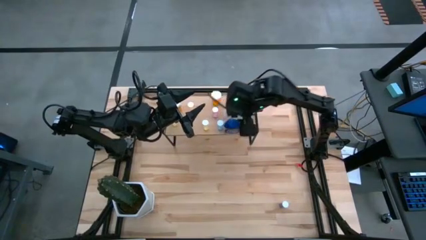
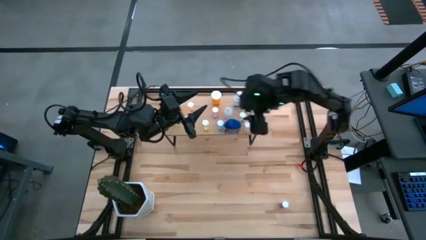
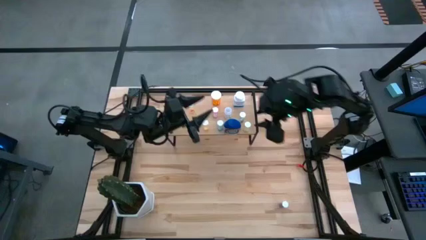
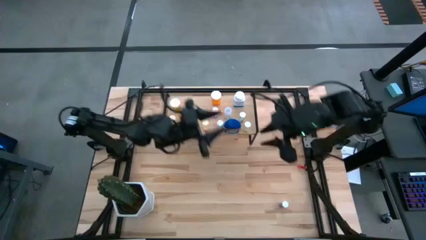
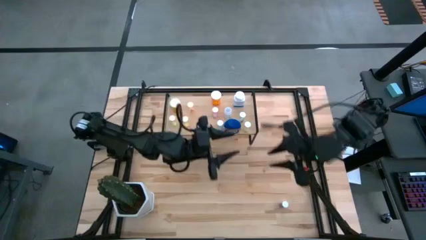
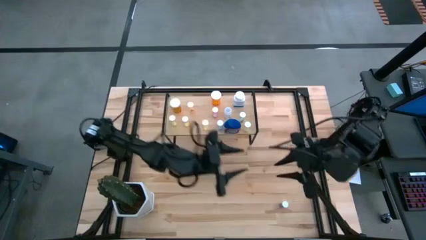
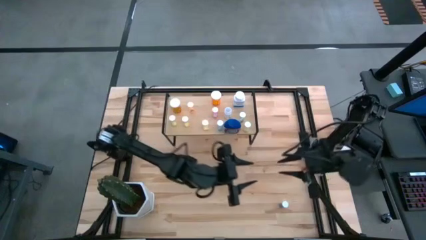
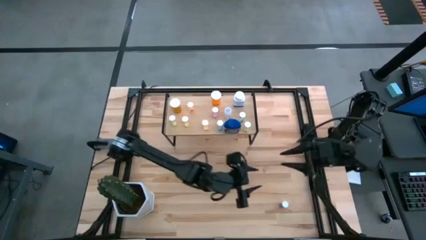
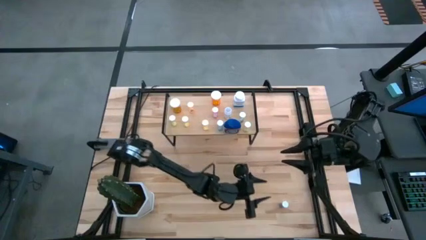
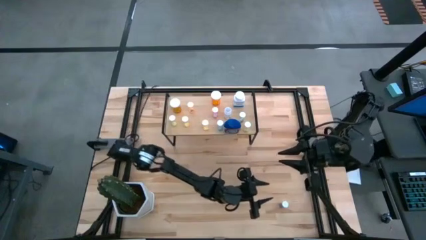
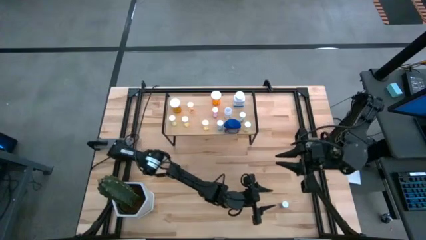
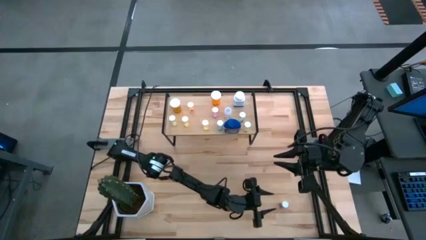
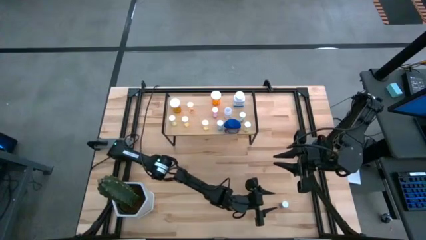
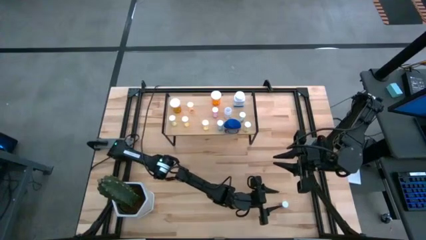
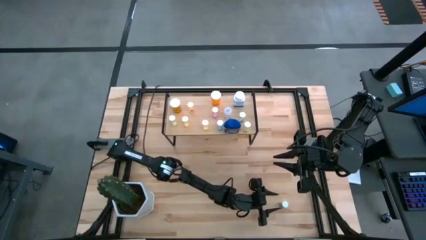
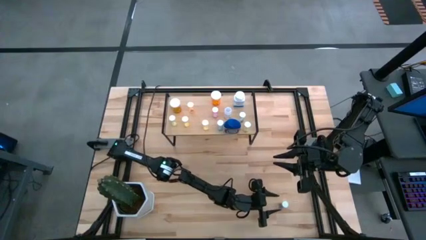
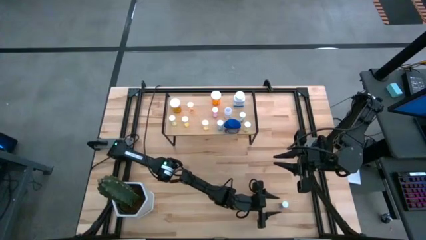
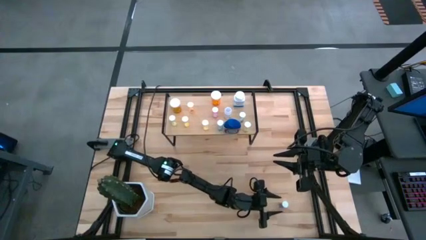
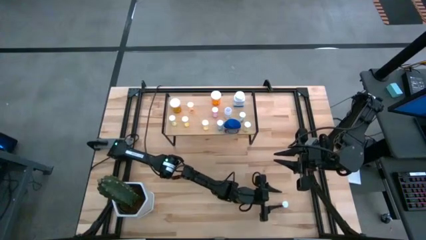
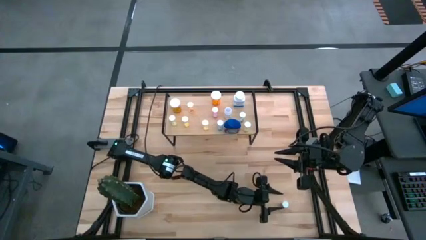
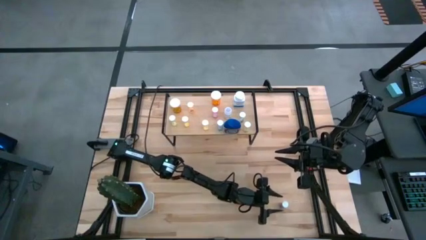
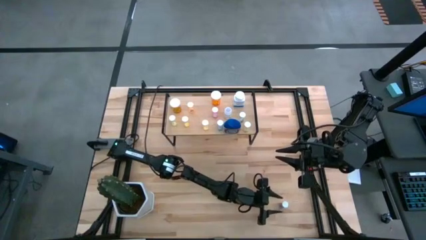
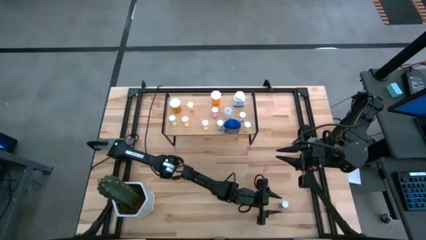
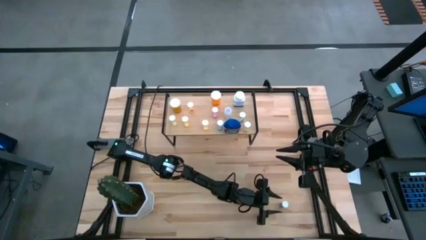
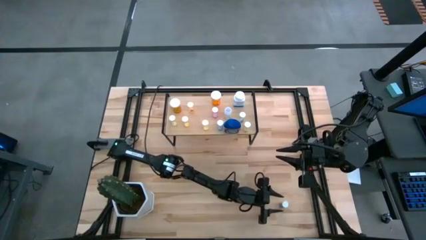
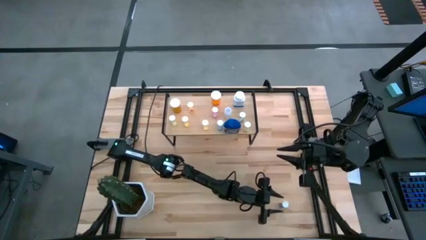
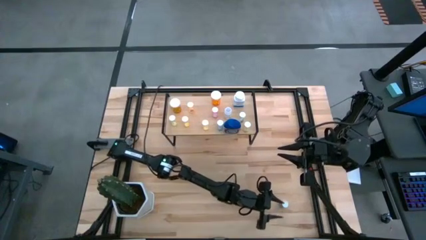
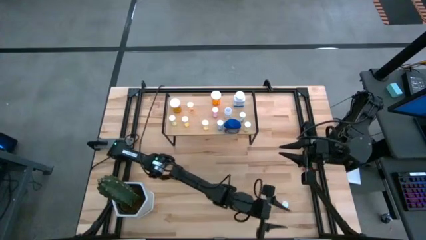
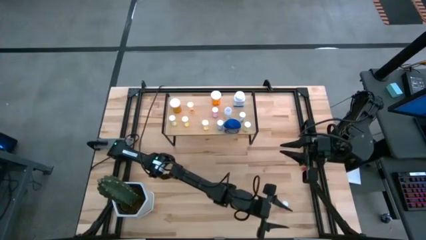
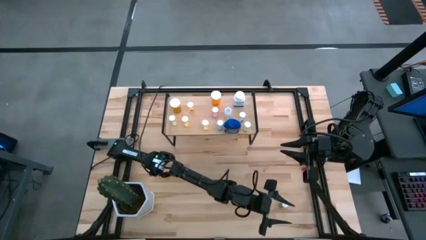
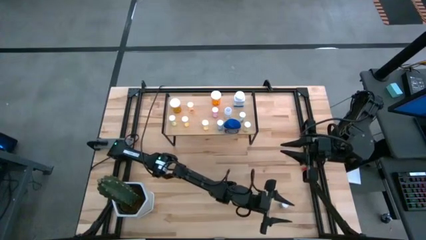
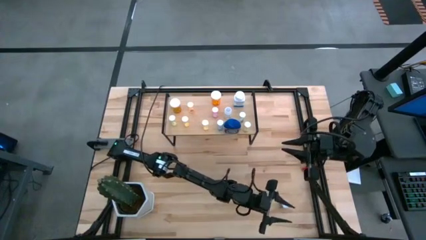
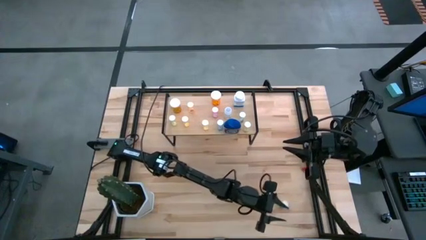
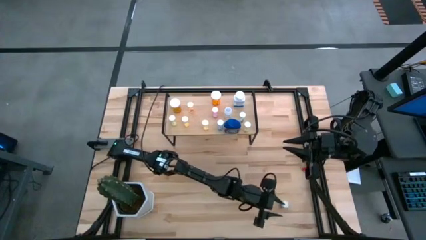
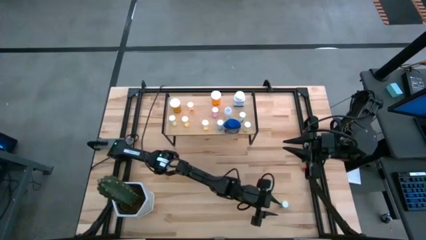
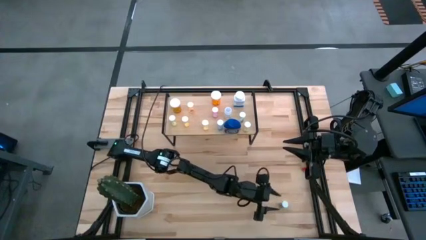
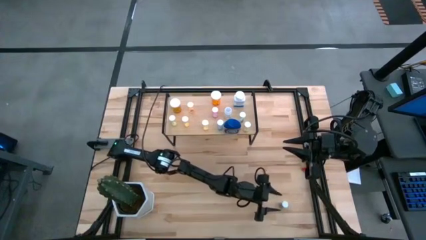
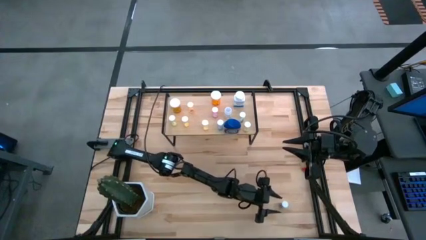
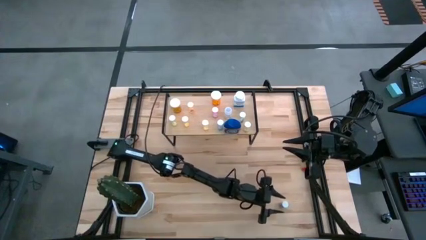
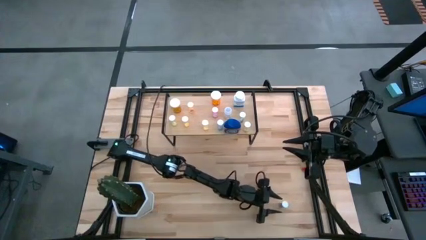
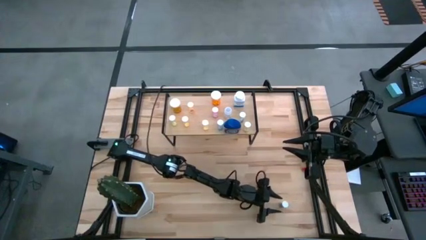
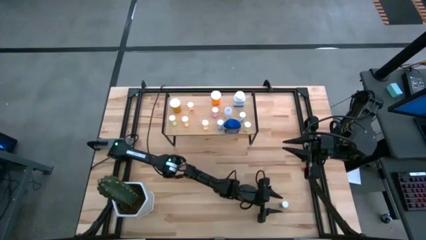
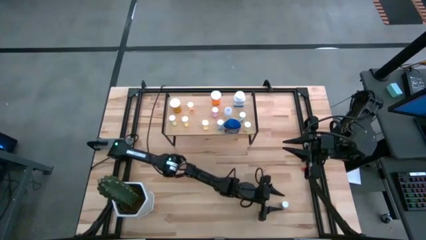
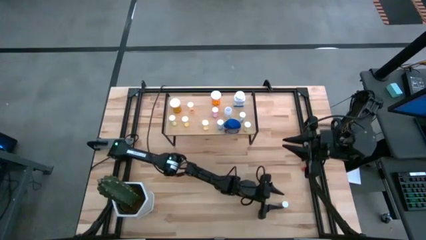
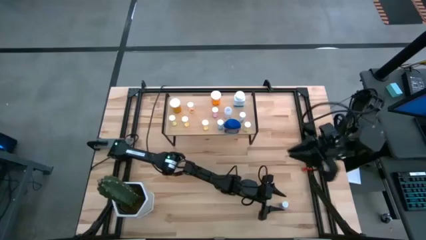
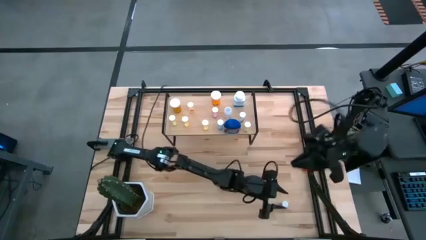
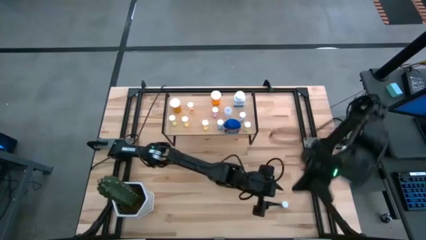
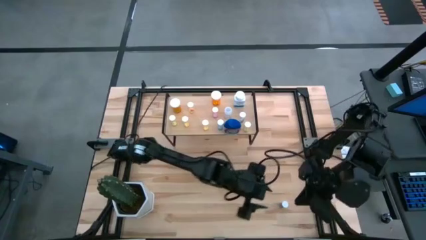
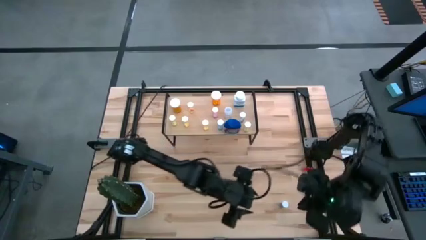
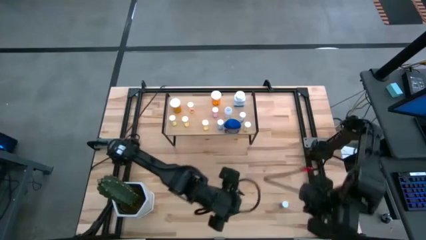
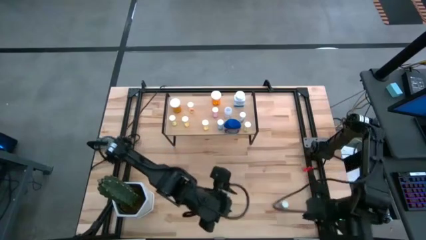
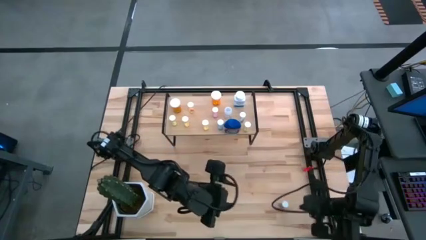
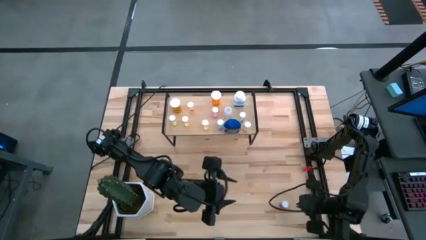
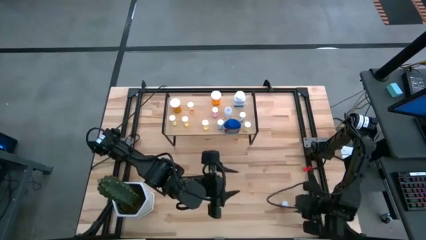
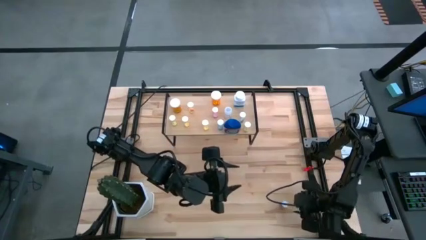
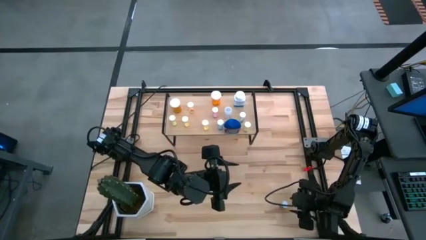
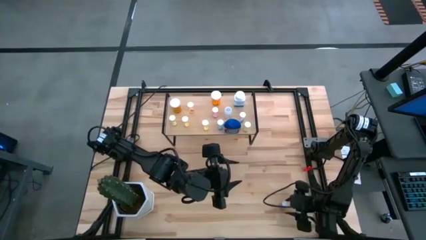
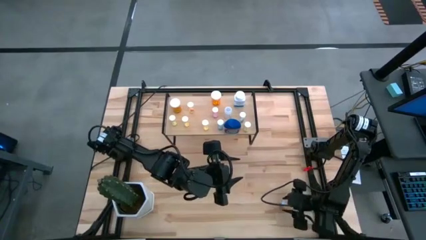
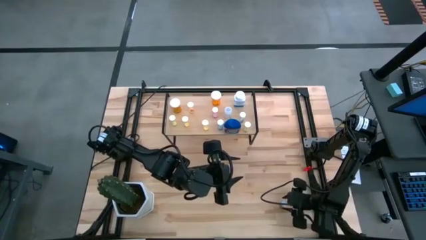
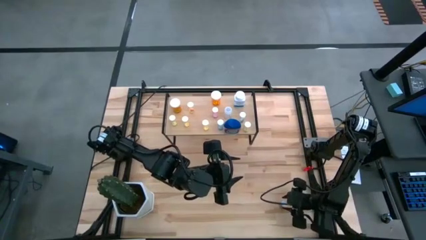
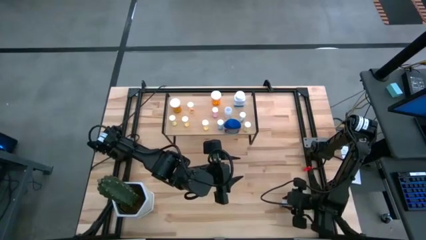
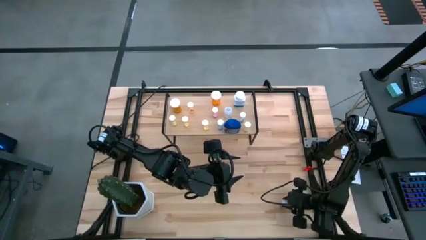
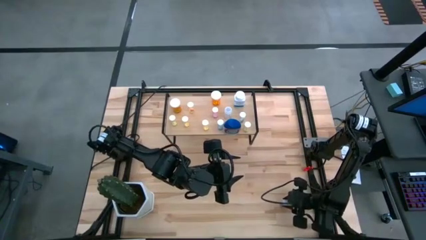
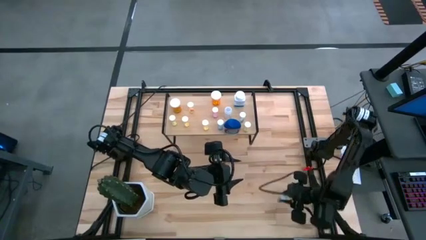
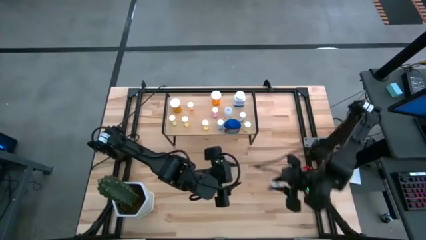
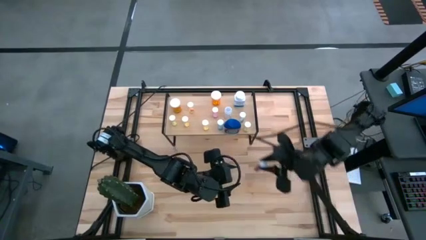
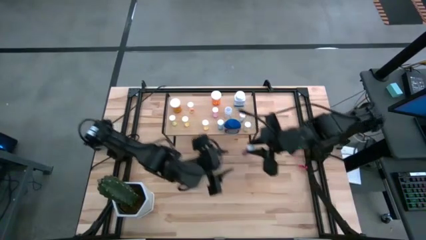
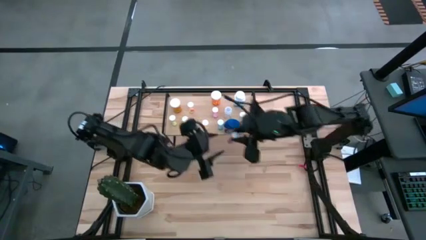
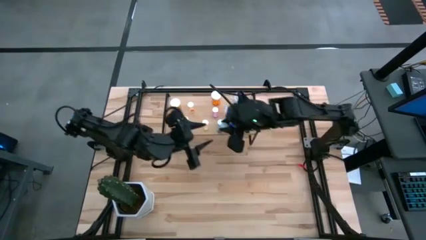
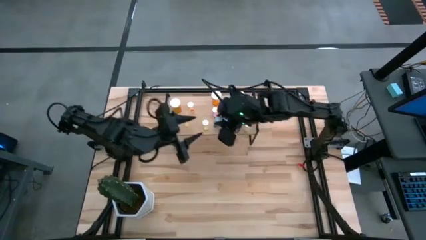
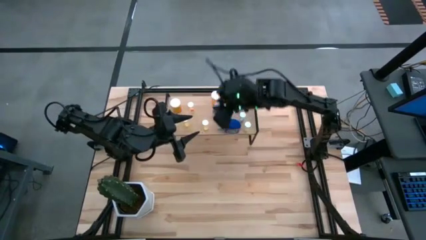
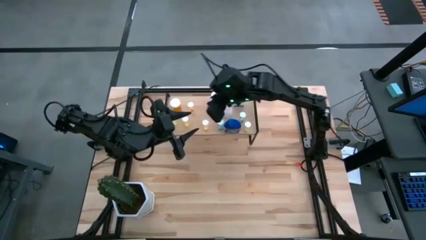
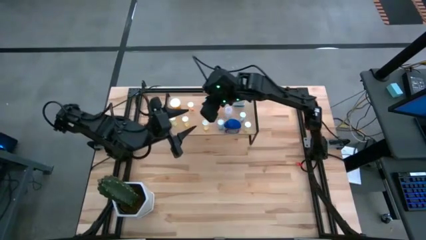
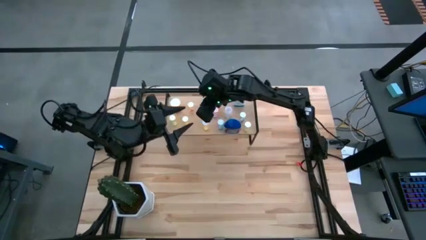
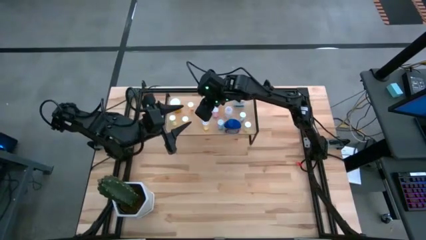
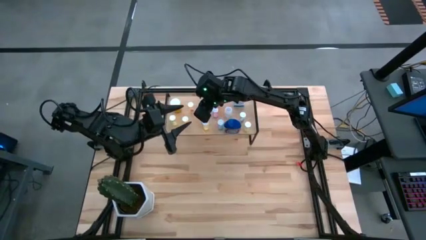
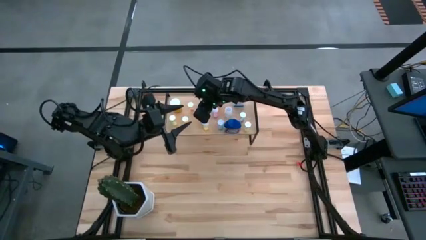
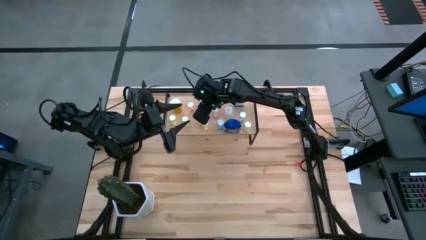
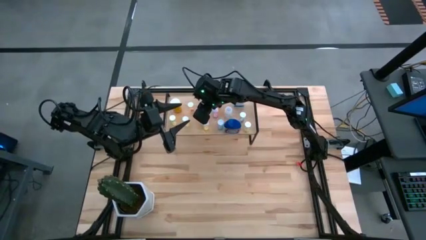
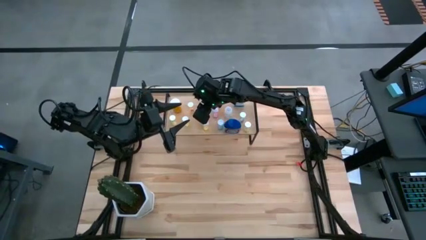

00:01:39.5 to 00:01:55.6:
Task: Pick and place medicine bottles onto shelf by color
Put the blue pill bottle on the shelf
